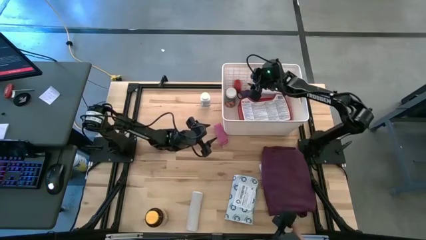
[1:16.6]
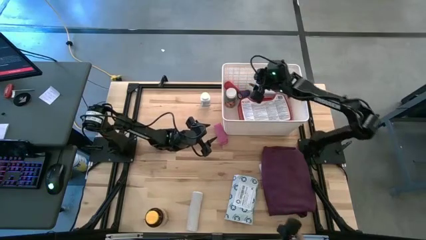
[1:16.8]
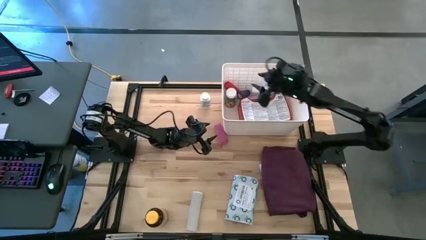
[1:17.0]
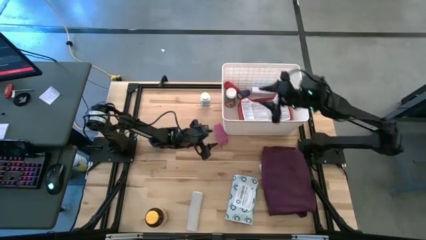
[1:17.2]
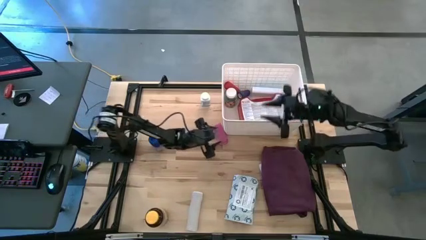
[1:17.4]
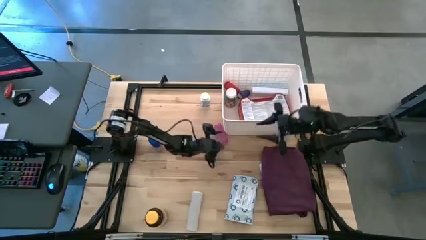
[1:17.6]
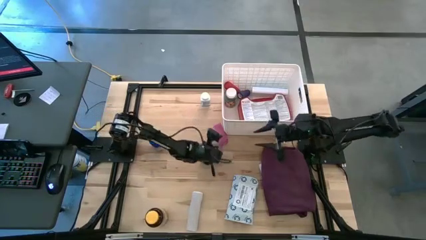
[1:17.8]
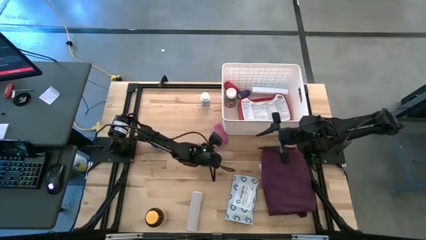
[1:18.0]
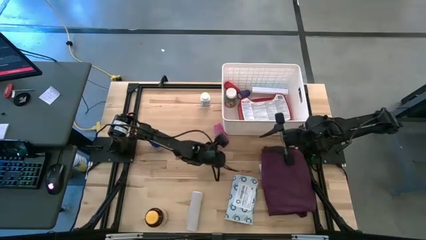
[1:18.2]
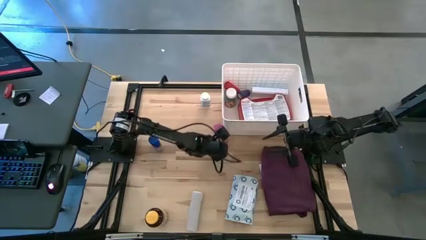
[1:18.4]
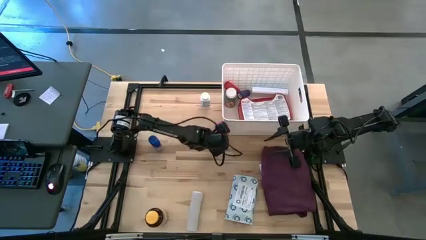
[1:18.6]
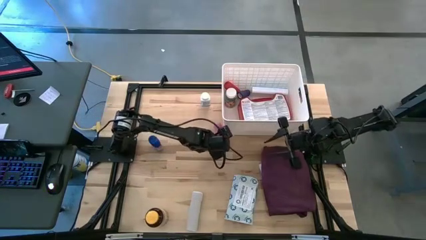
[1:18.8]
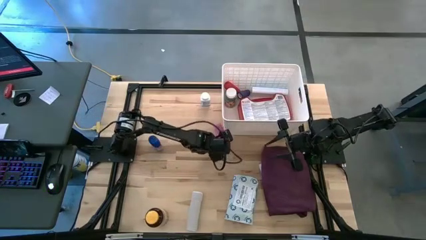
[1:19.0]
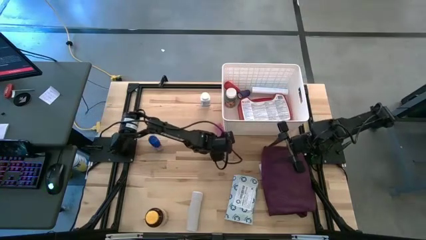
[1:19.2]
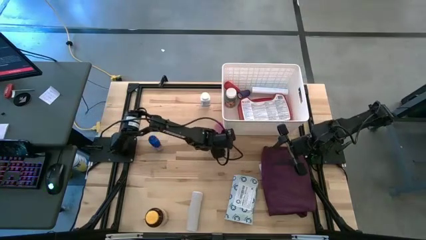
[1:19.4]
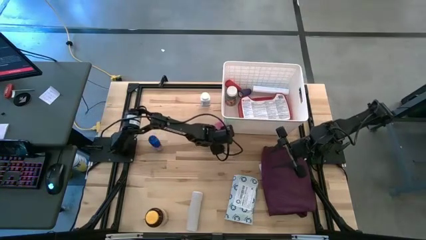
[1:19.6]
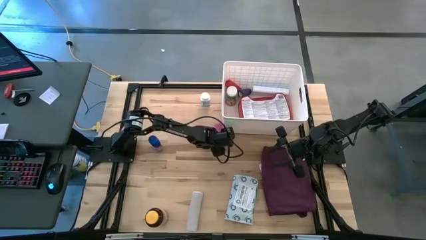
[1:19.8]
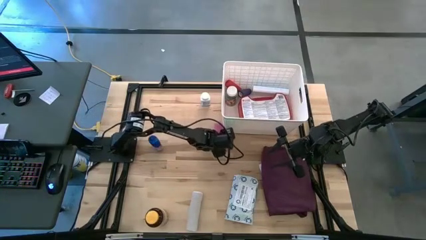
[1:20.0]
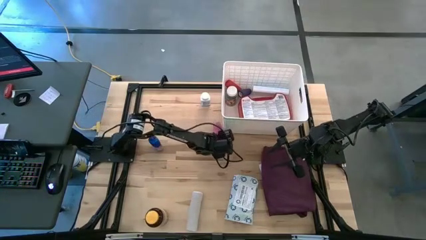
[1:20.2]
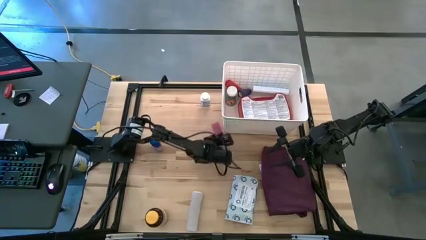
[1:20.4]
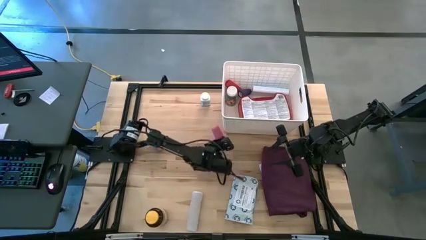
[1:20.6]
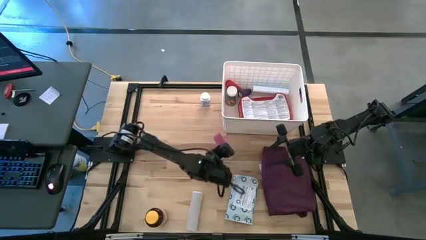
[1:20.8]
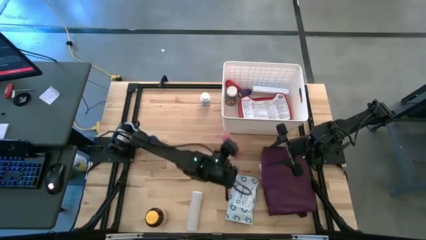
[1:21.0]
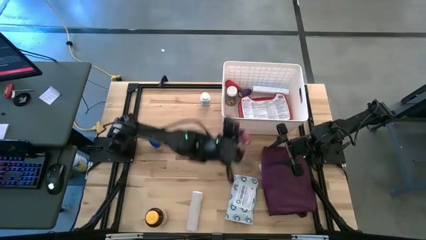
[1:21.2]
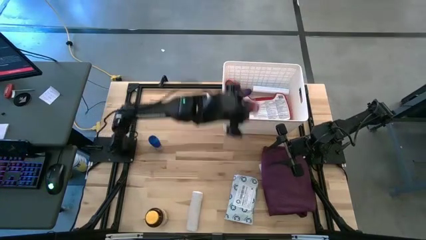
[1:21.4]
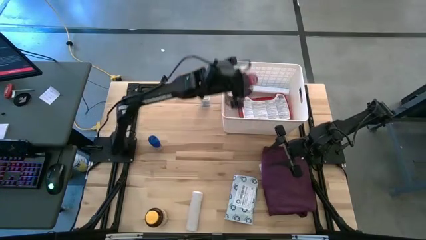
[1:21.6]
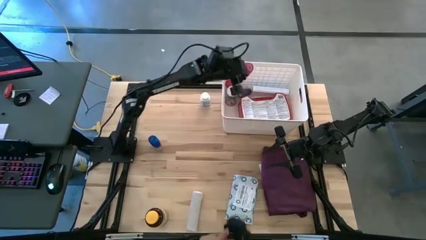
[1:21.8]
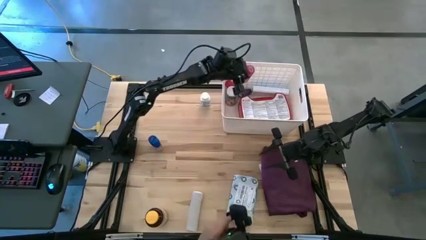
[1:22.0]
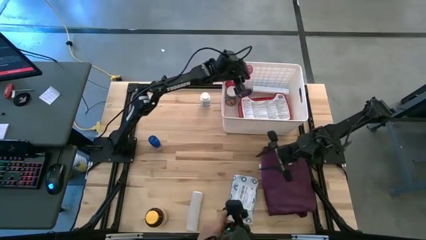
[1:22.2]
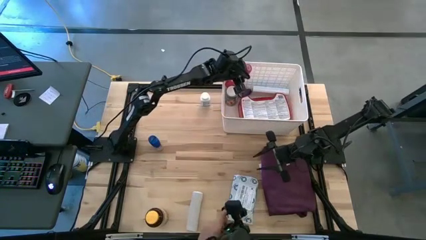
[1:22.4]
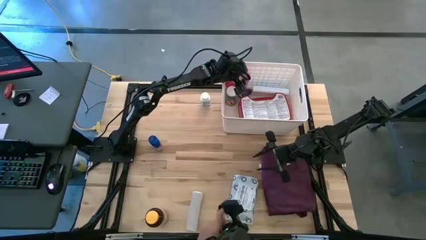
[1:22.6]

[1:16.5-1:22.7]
Task: Pick & place medical supplies in basket/bin
Put the pink bandage into the white container

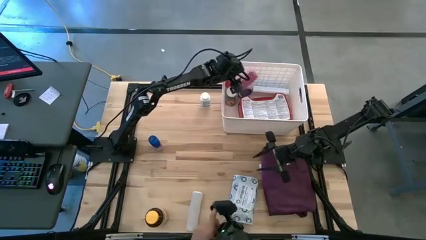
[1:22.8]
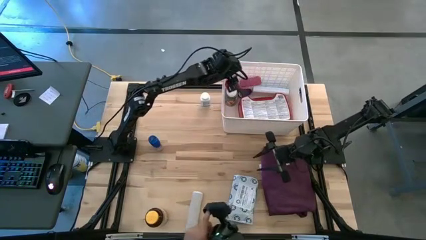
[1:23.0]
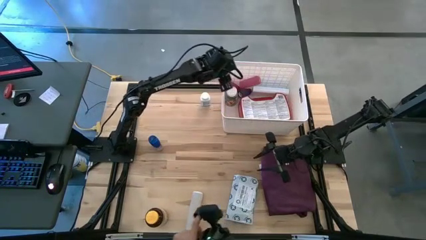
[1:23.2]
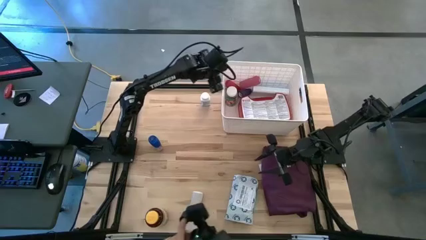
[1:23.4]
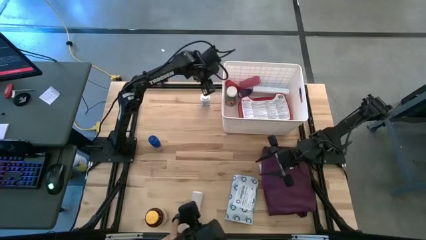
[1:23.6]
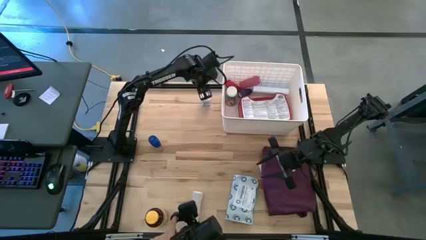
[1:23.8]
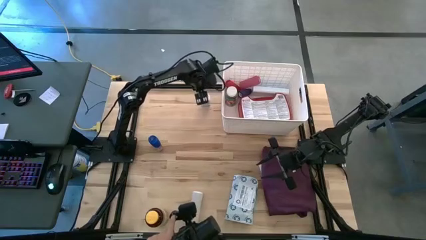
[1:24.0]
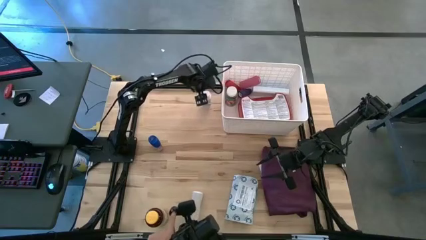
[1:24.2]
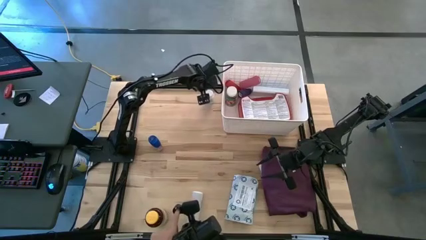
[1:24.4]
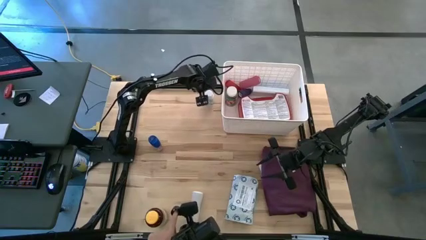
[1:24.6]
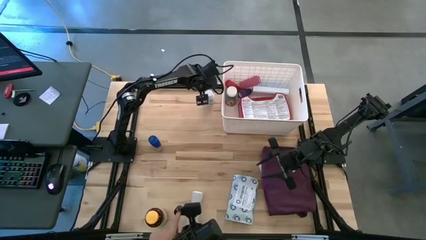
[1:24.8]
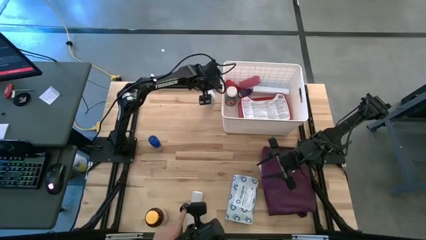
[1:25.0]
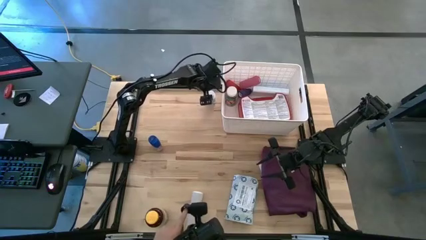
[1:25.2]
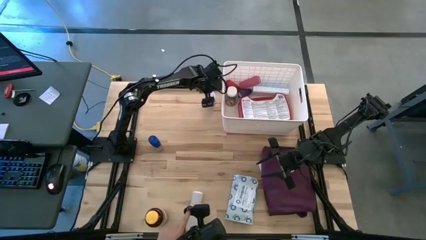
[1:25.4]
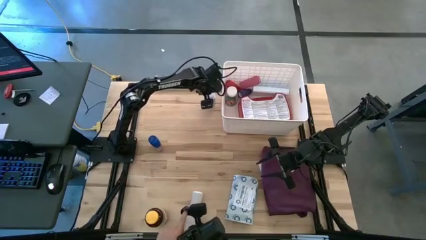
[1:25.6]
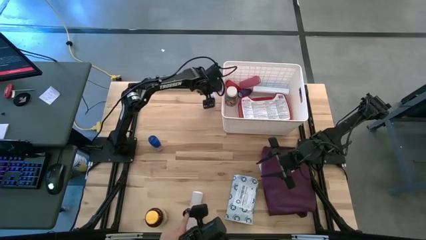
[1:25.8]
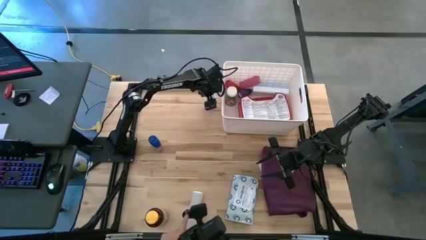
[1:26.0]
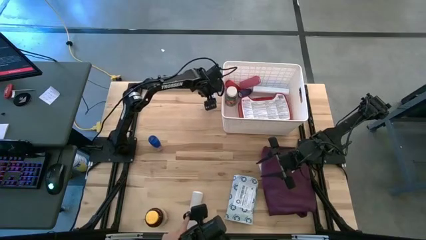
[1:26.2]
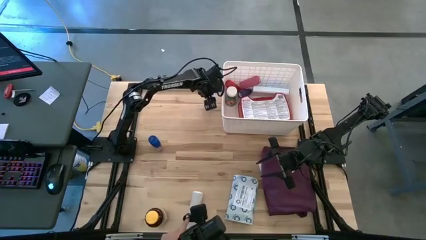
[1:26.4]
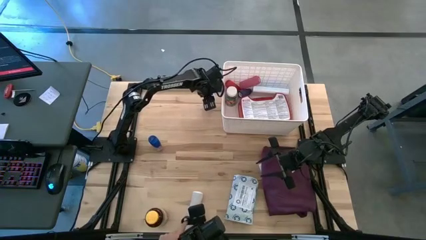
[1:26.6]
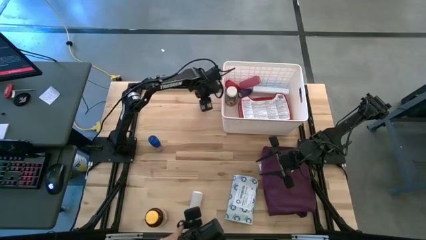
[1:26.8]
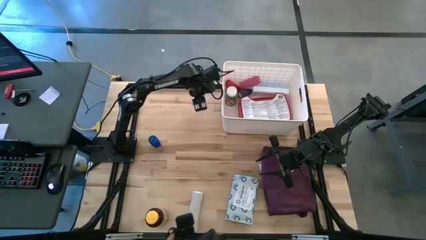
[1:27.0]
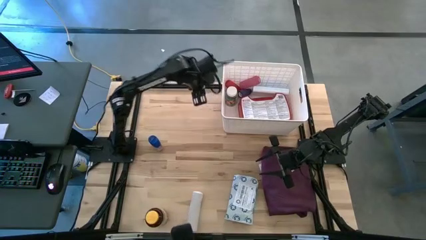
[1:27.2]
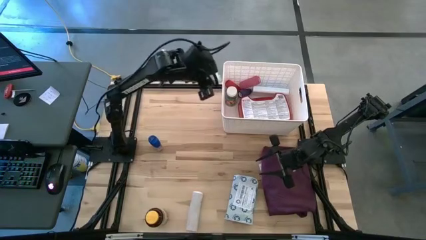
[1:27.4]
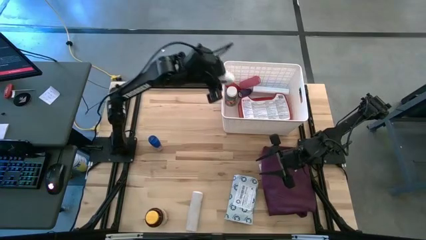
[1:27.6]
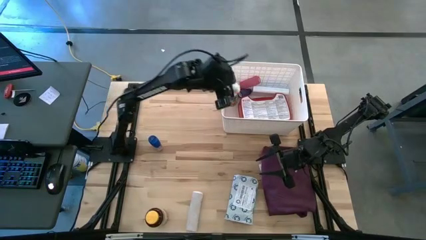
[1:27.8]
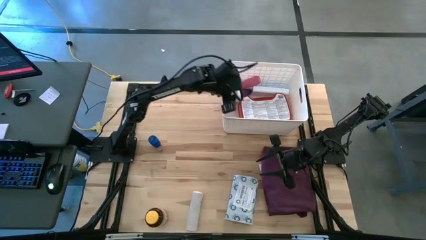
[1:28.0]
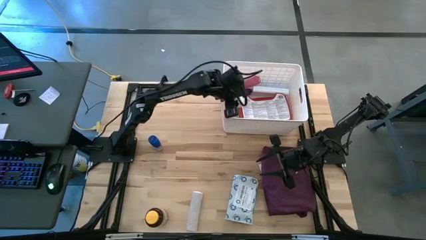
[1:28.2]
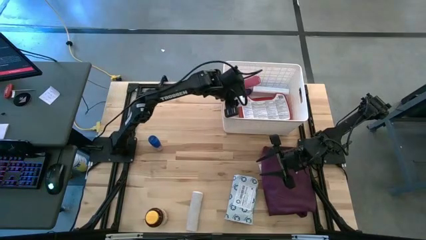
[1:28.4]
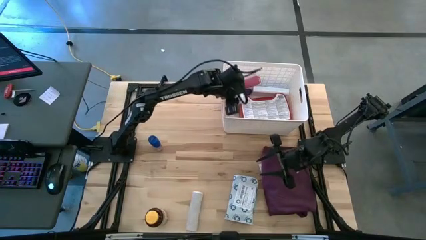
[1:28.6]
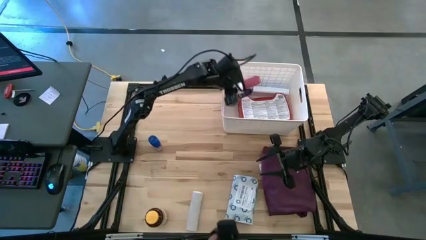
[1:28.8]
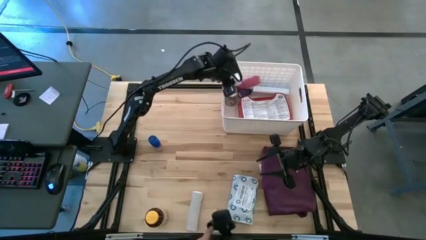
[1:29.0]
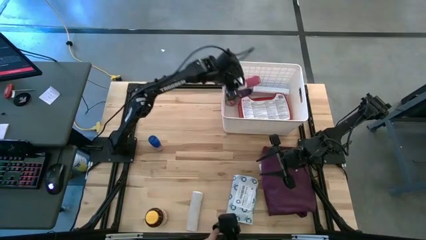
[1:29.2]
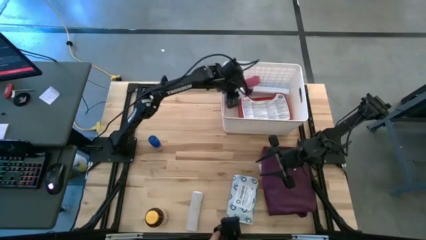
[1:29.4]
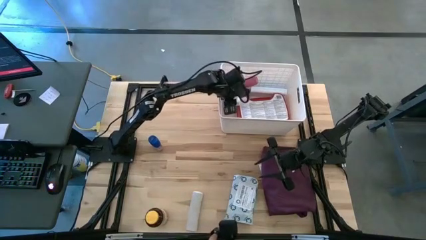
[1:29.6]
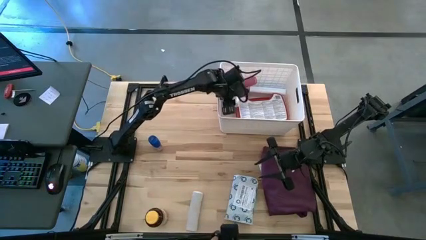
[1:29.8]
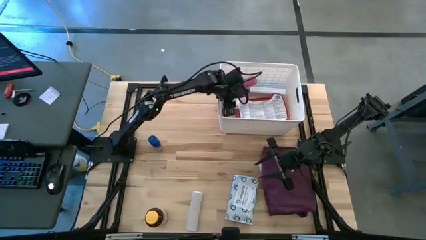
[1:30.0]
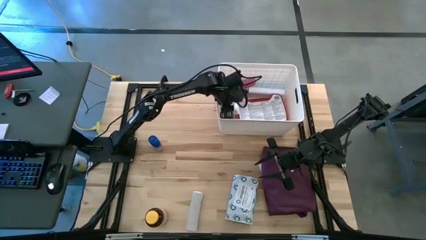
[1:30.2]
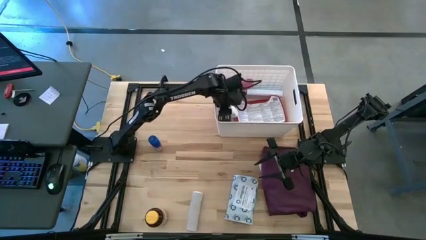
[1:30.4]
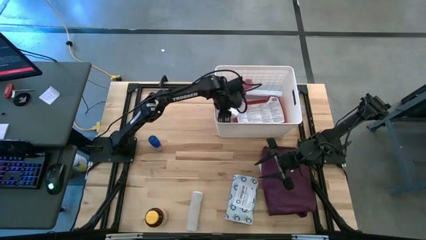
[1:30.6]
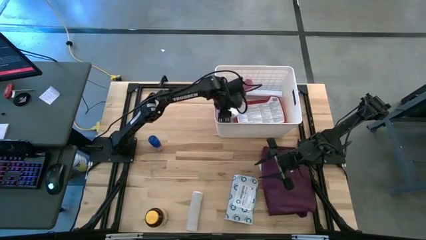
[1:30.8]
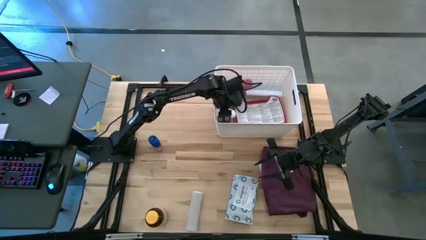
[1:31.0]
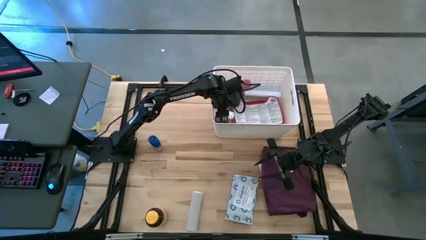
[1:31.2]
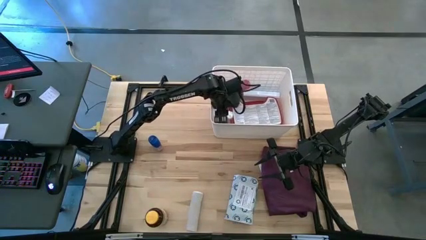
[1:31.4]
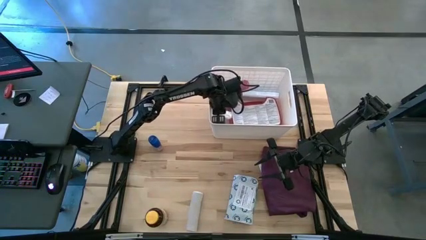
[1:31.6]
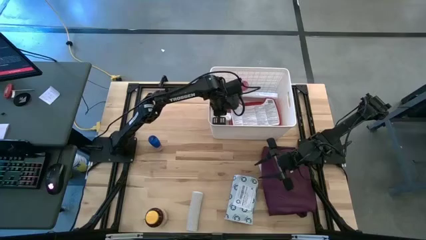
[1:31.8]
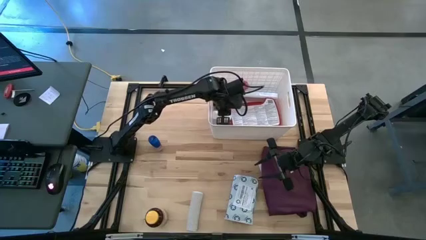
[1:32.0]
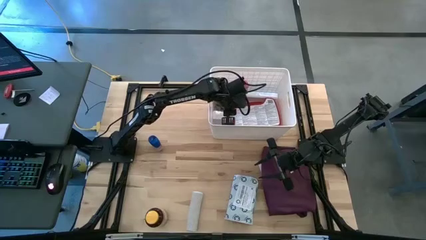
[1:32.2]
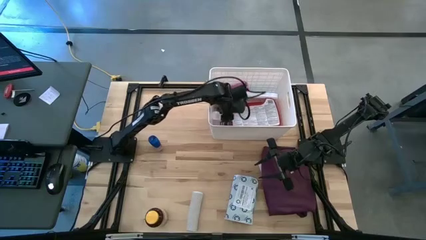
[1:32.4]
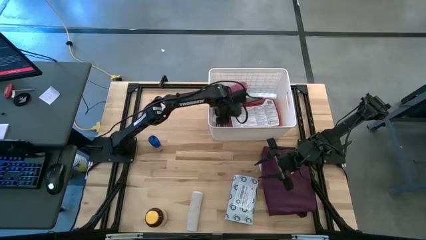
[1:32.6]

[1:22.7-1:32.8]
Put the white medicine bottle into the white container

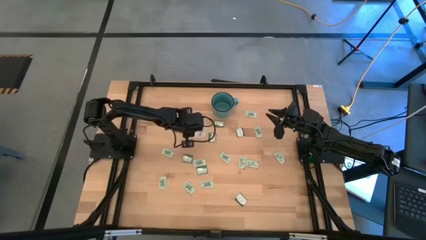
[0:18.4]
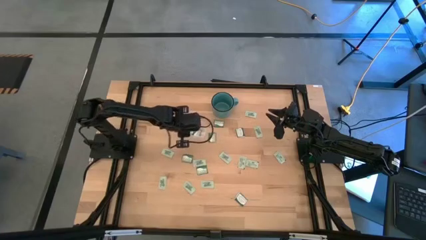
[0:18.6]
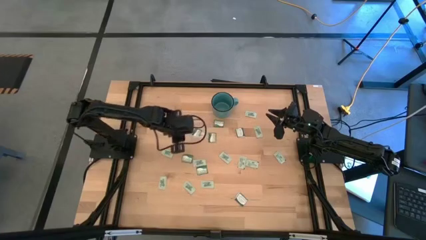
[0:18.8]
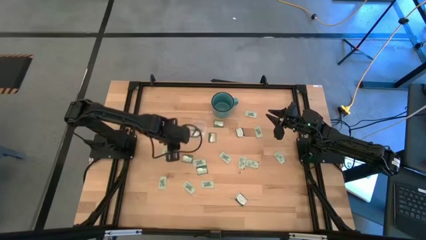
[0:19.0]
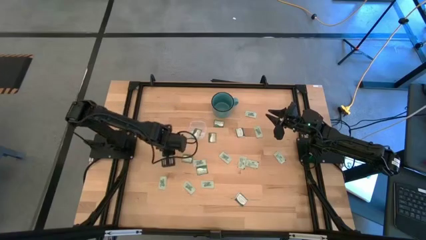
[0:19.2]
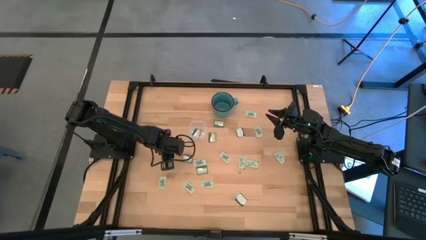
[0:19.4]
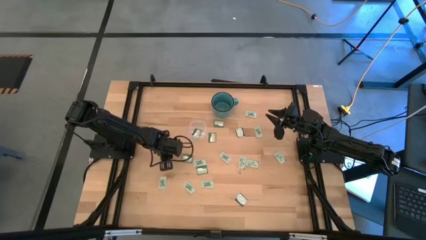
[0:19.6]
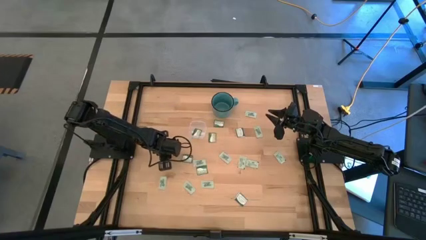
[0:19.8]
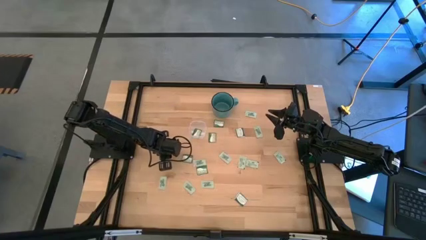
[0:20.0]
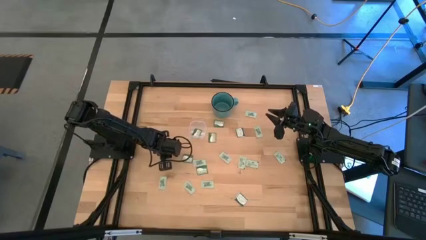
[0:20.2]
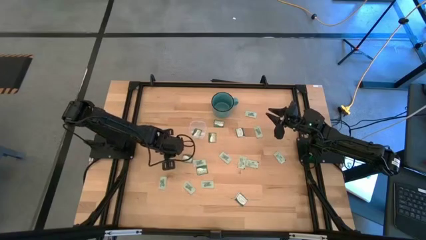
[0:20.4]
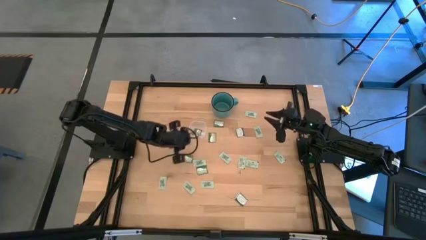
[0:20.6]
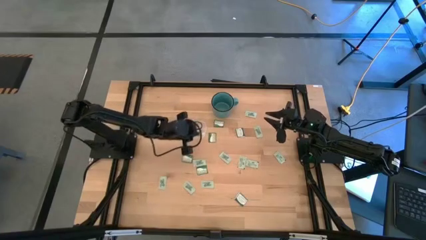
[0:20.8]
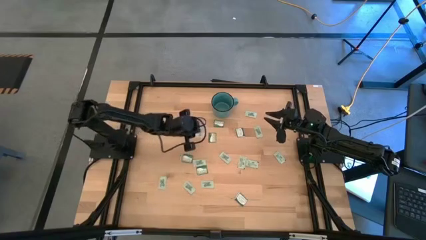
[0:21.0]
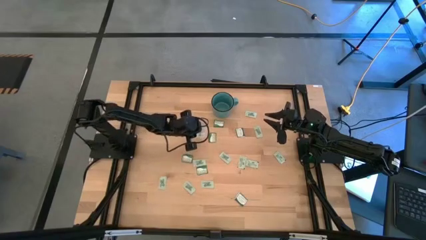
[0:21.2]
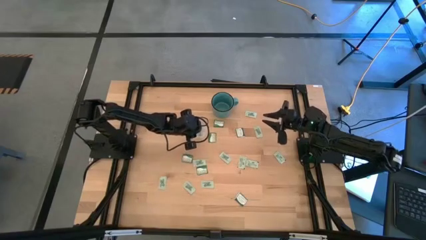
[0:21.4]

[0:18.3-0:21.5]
Task: Pick and place Stevia / Truvia into bins
Put the green stevia packet into the transparent container
